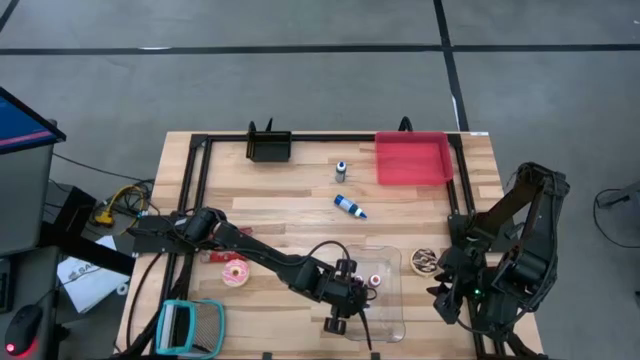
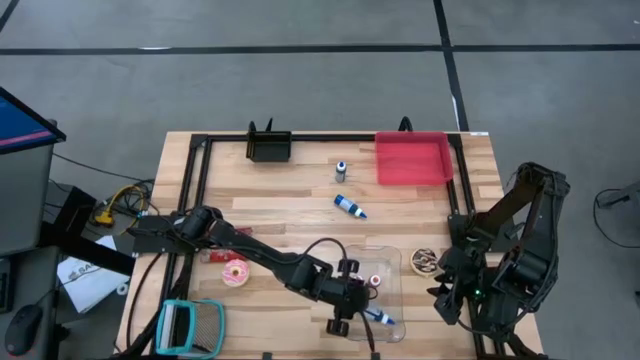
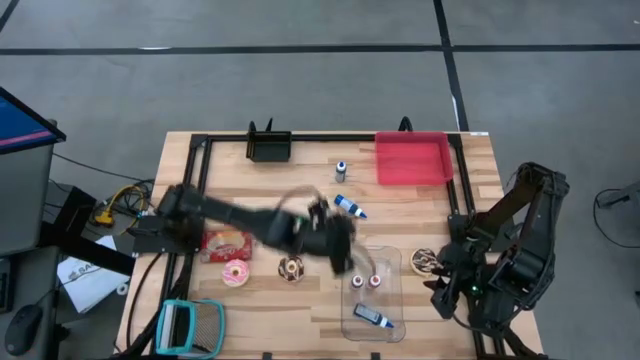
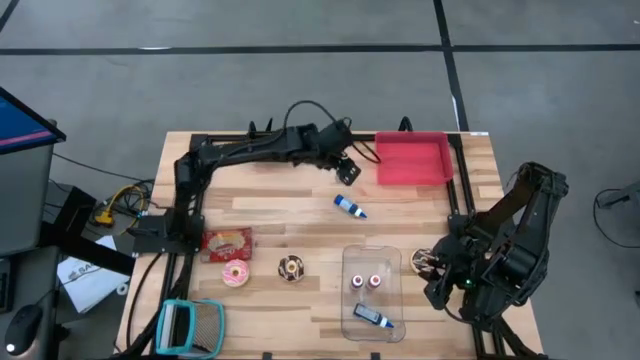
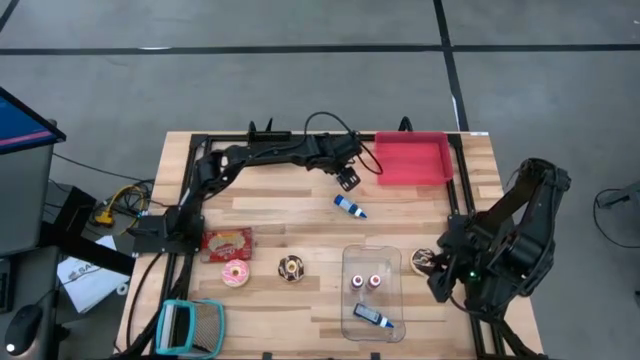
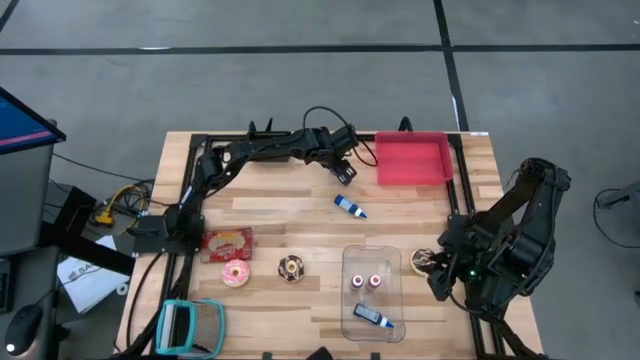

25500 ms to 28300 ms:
Put the top blue food coloring bottle into the transparent bin

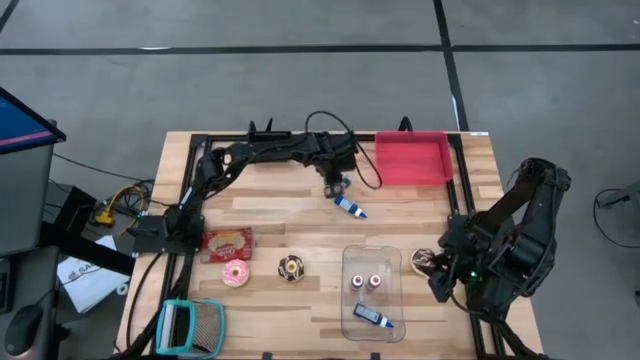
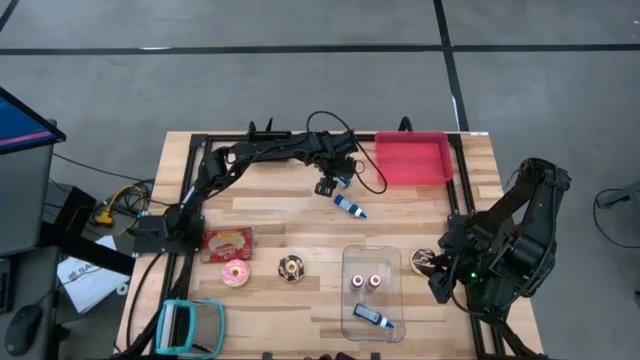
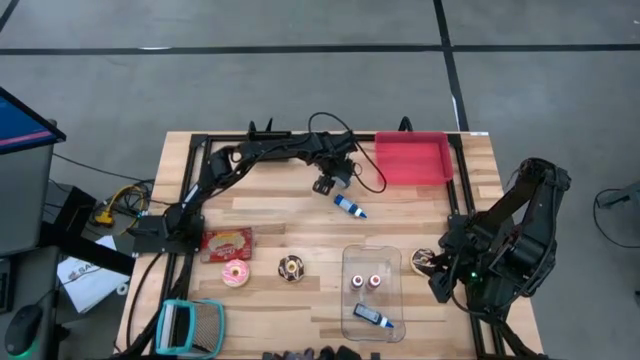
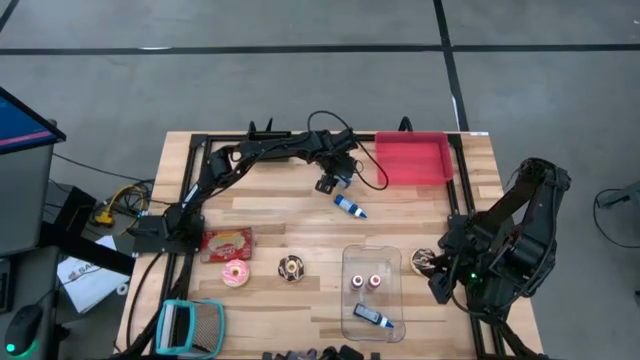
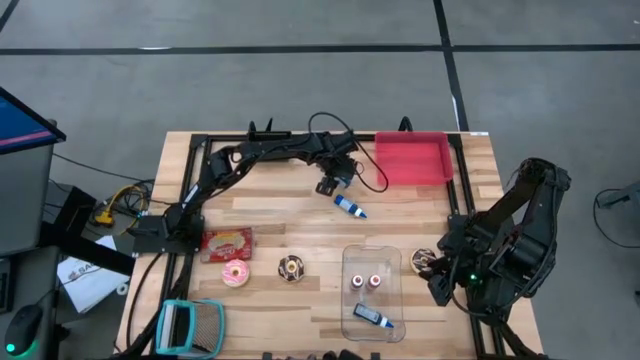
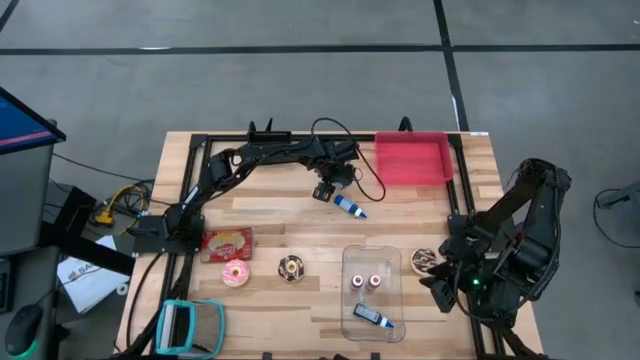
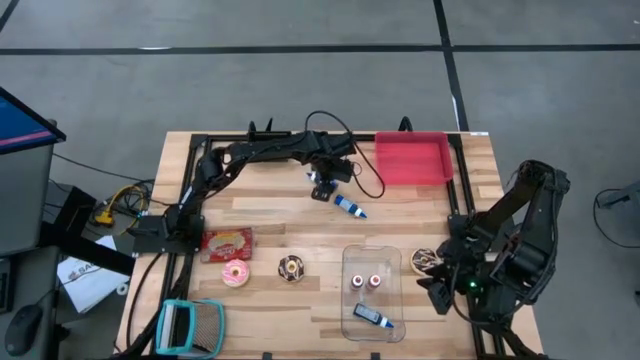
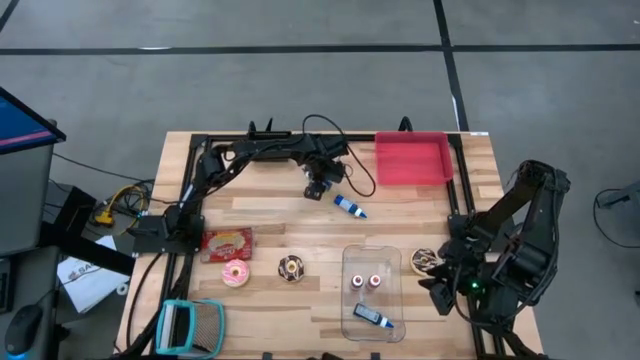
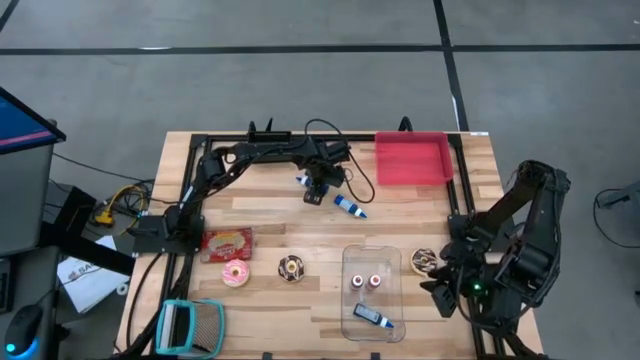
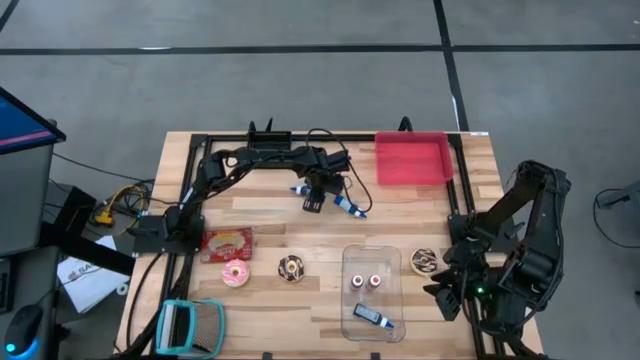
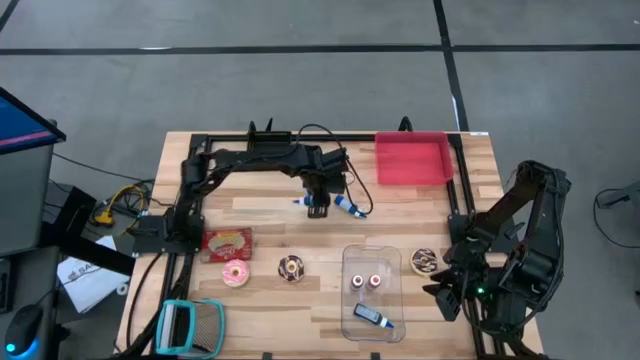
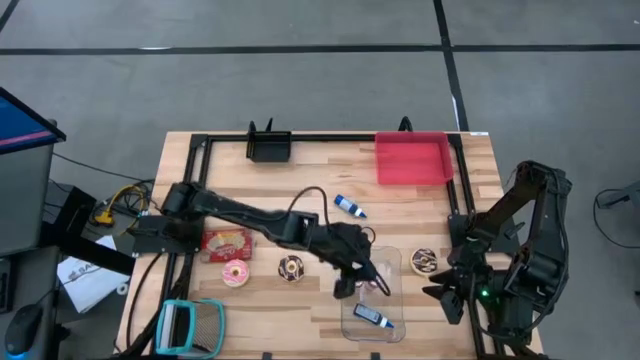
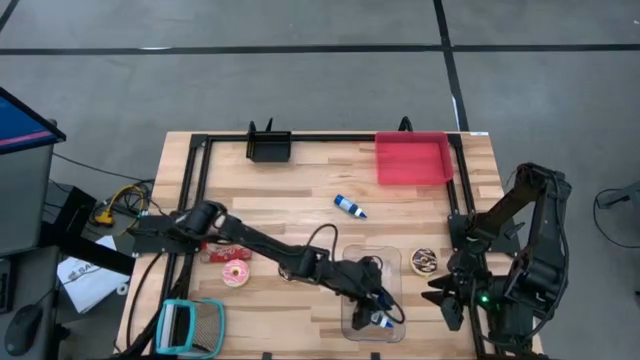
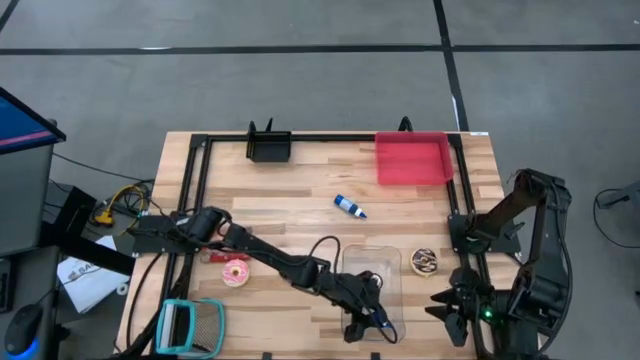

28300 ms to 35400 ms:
Put the top blue food coloring bottle into the transparent bin

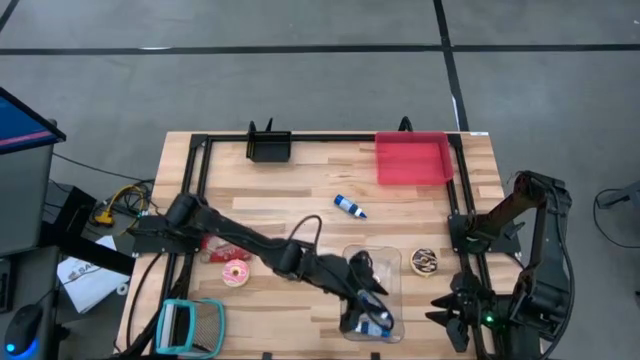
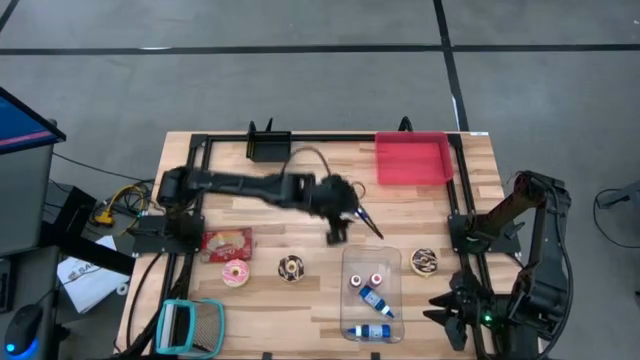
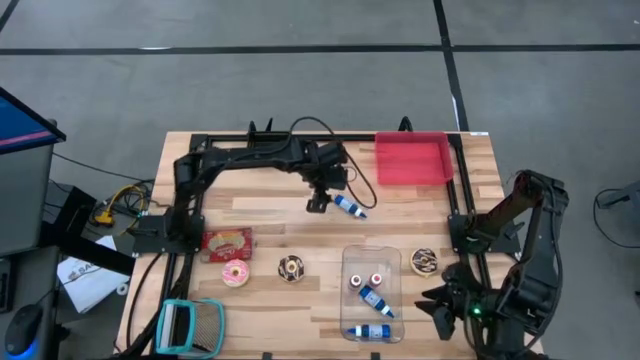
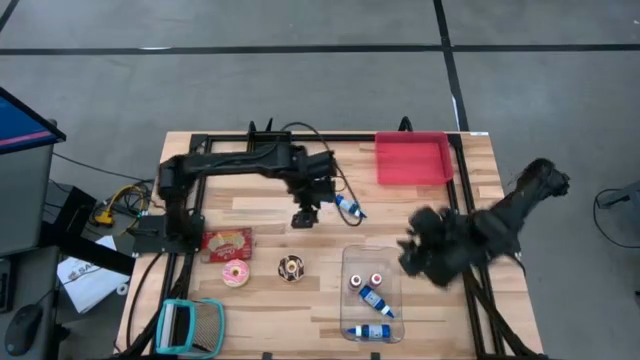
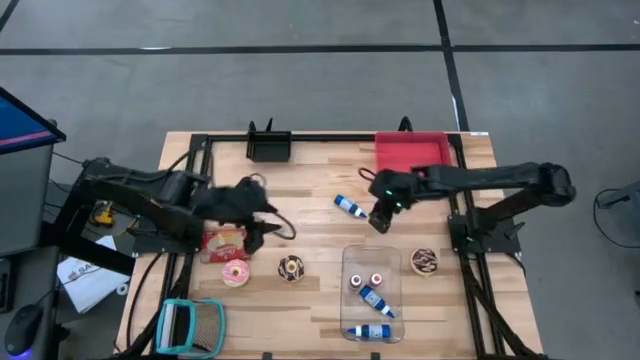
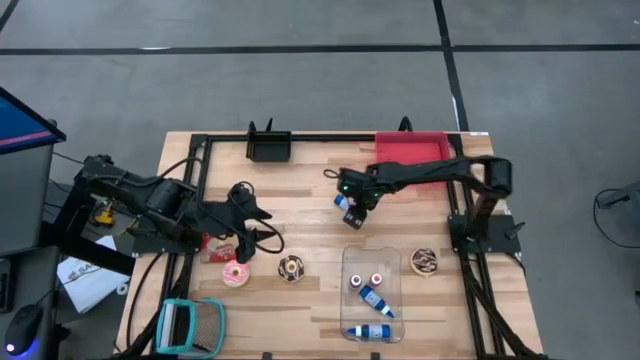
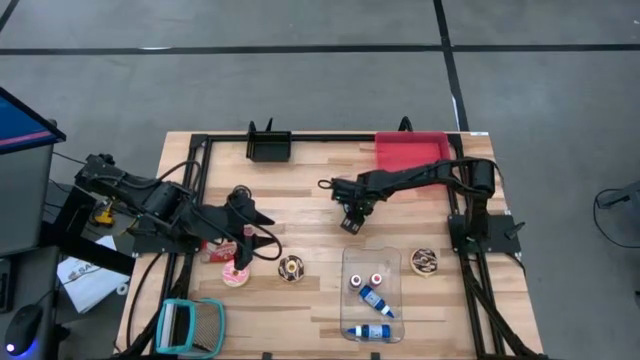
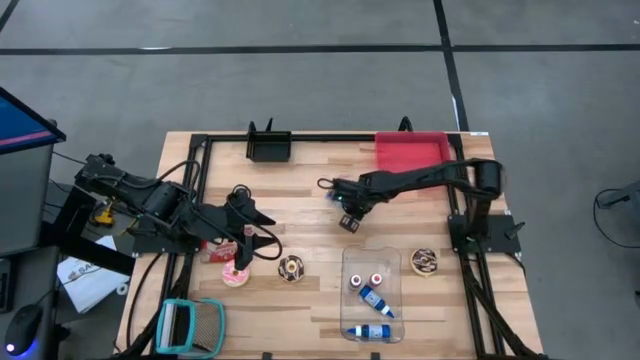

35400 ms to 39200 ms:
Put the blue food coloring bottle into the transparent bin

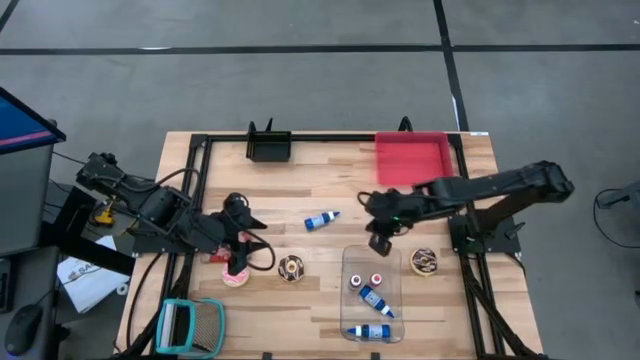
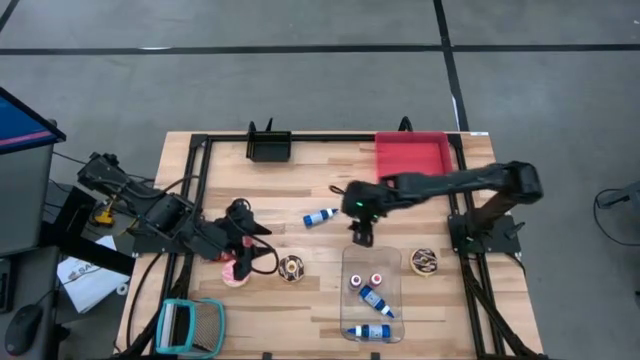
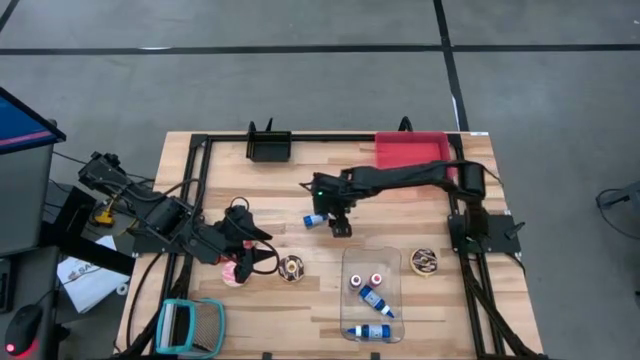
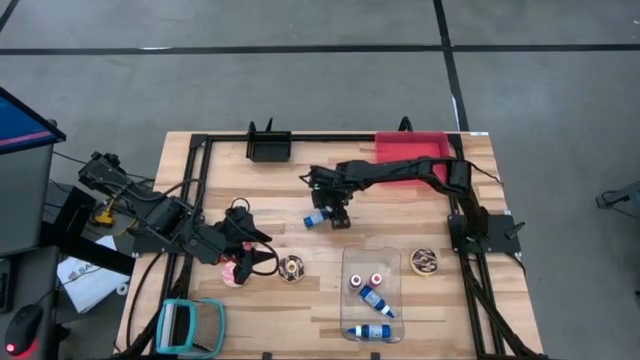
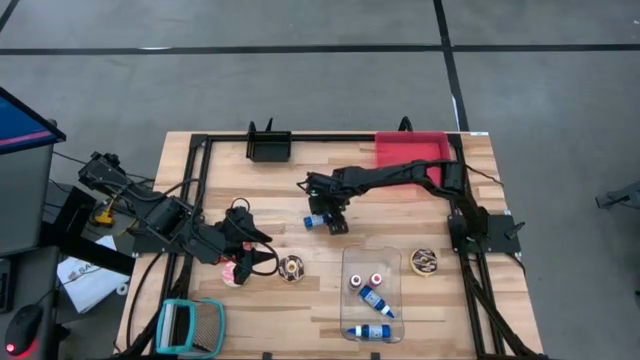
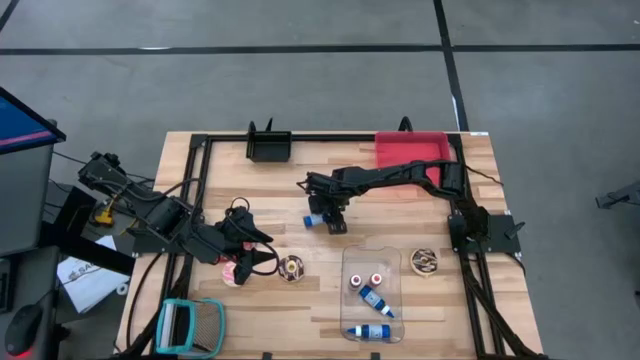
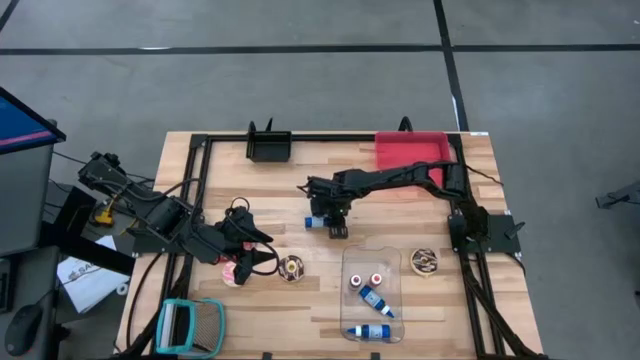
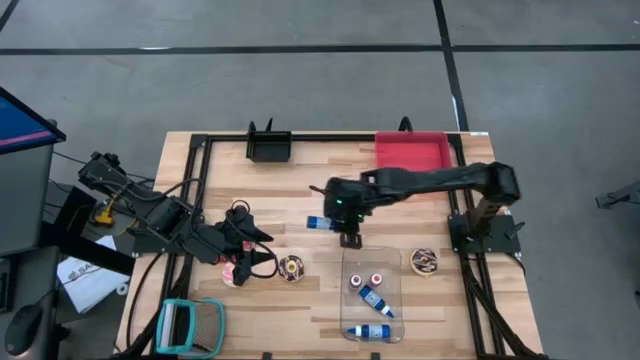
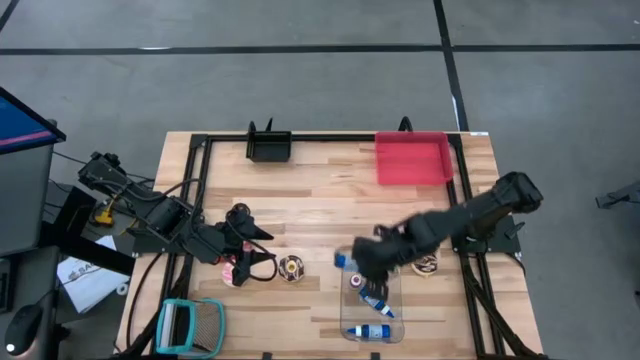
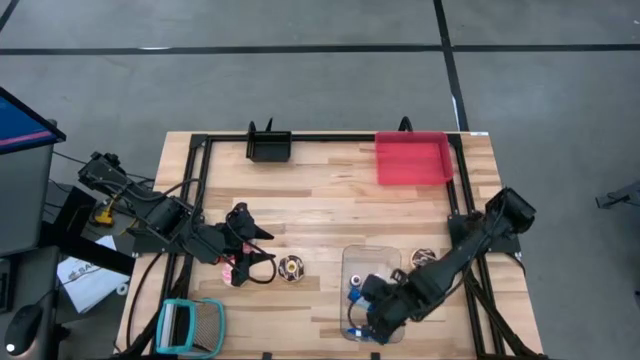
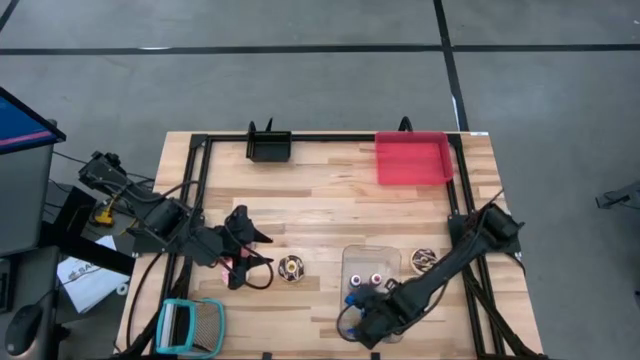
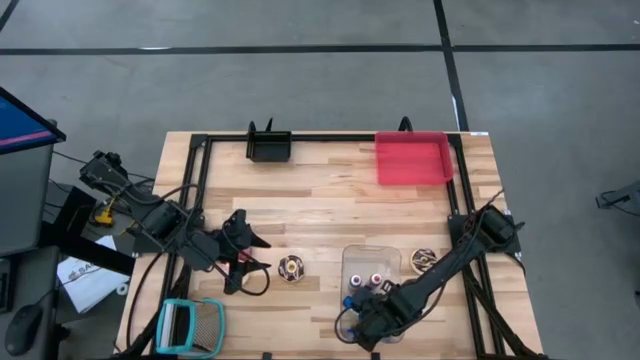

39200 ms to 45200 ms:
Put the blue food coloring bottle into the transparent bin
